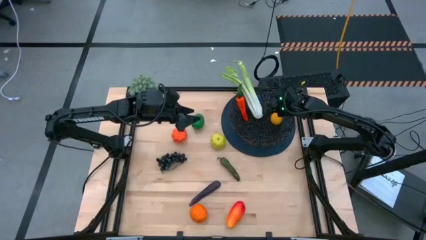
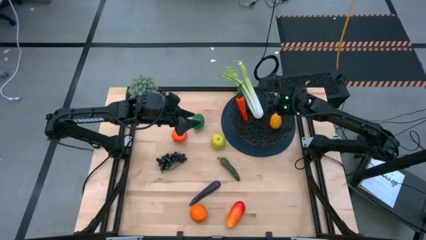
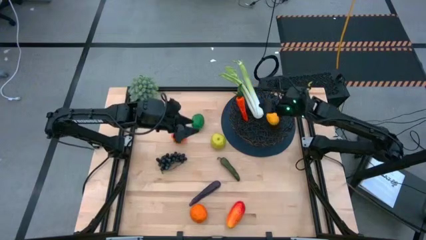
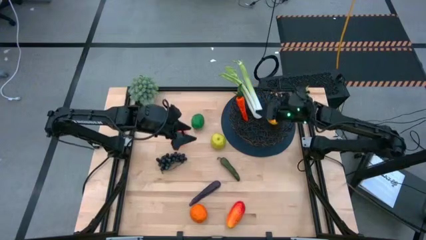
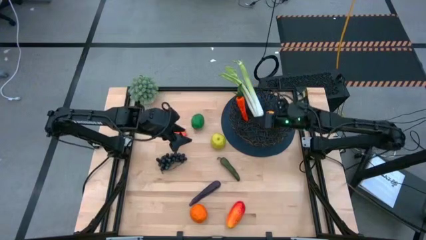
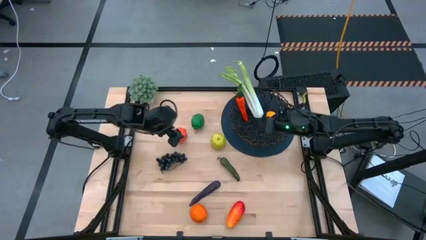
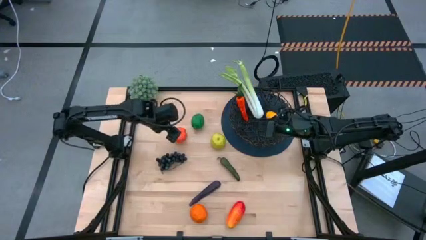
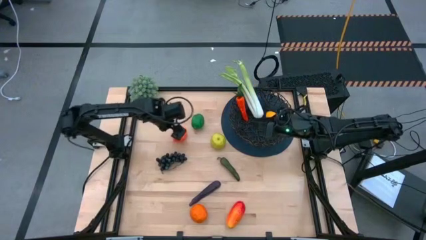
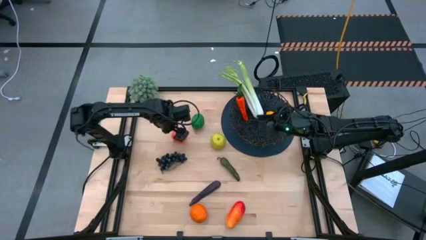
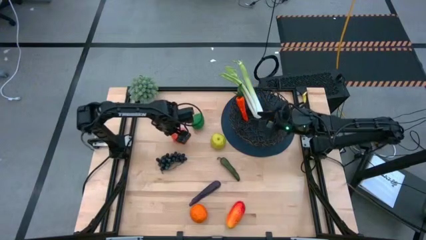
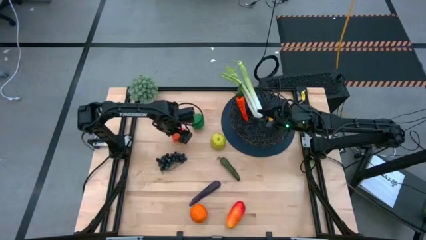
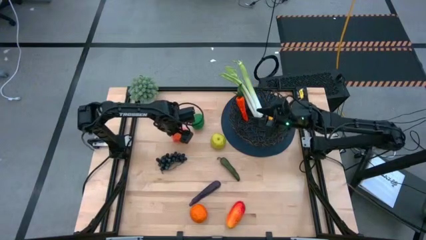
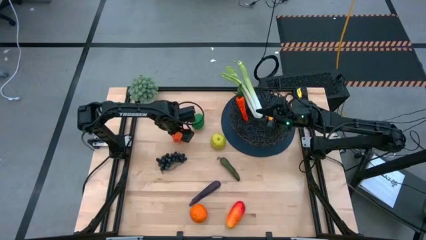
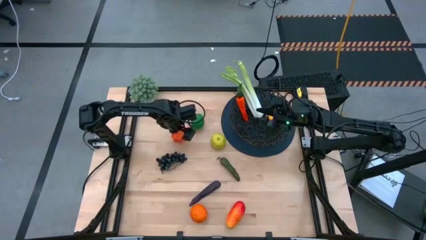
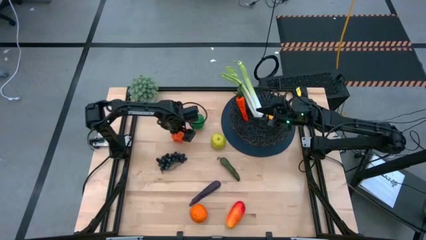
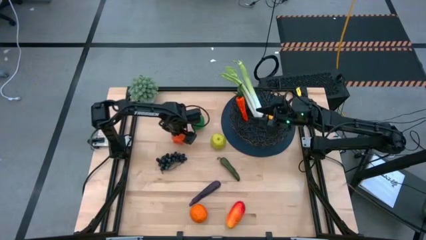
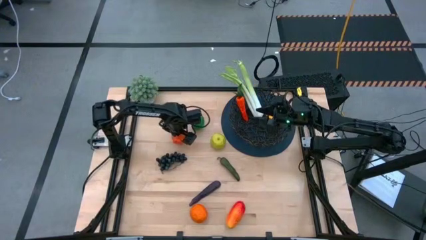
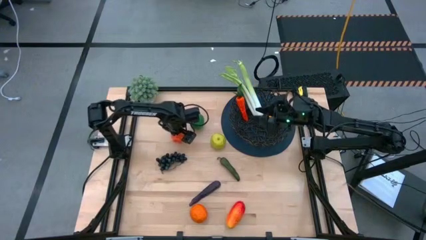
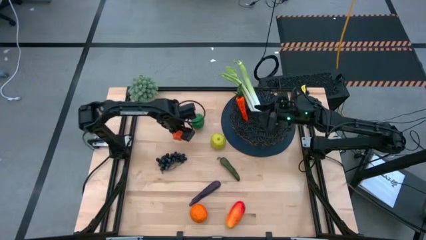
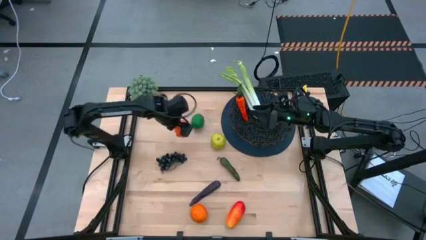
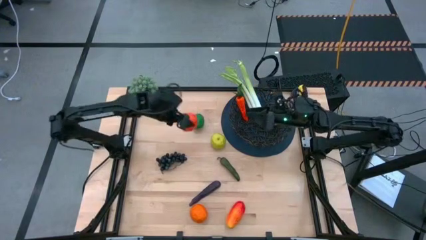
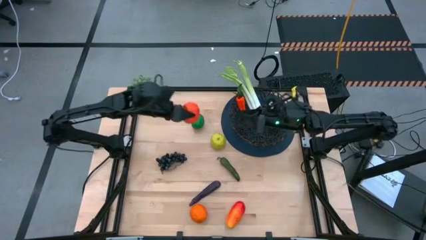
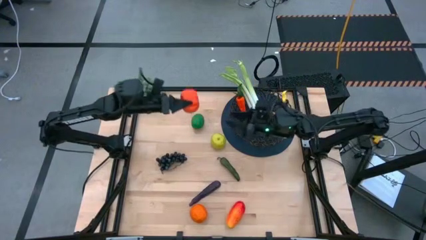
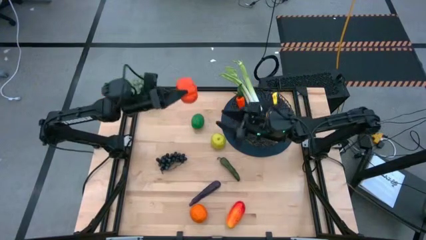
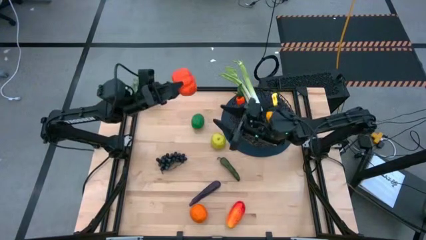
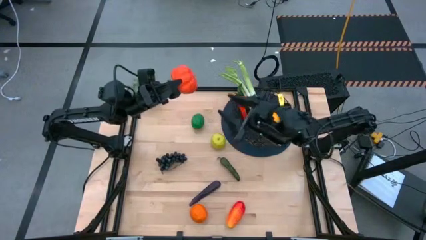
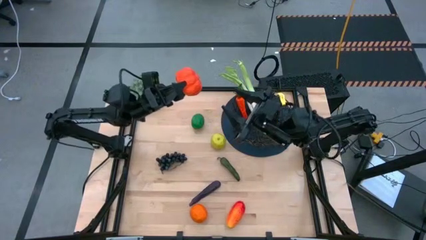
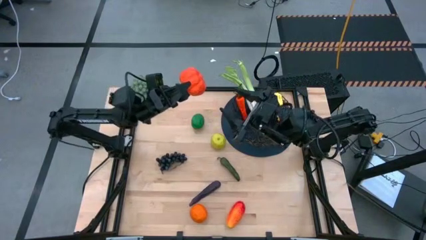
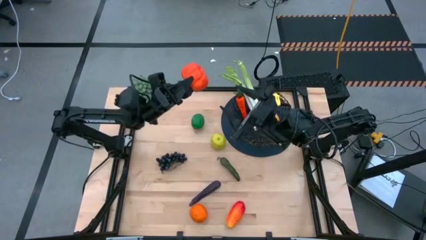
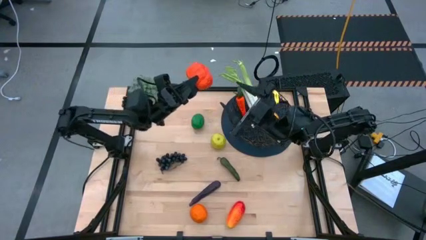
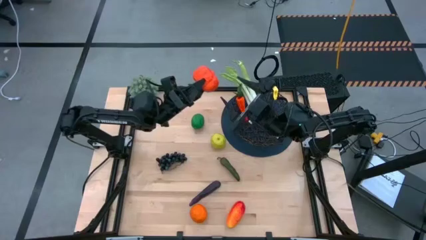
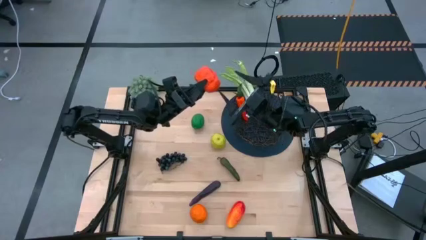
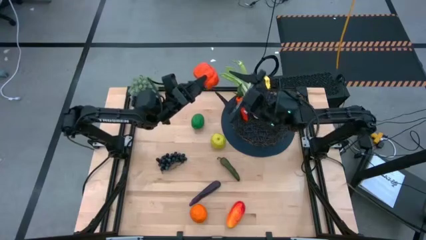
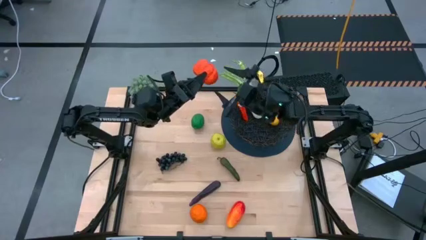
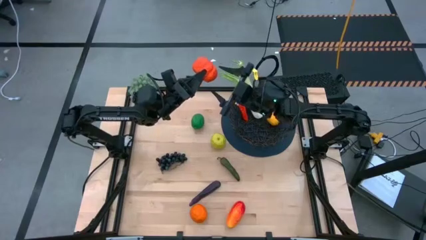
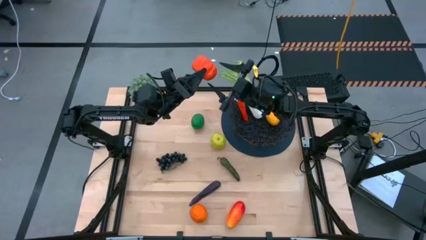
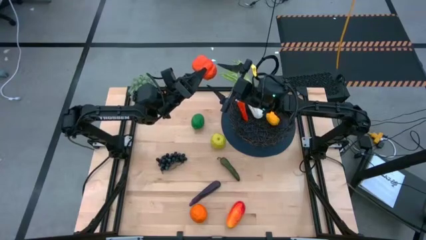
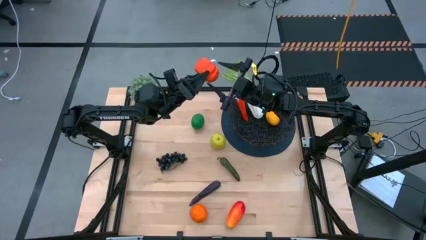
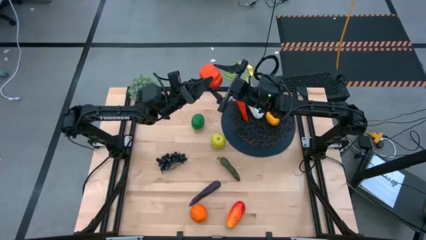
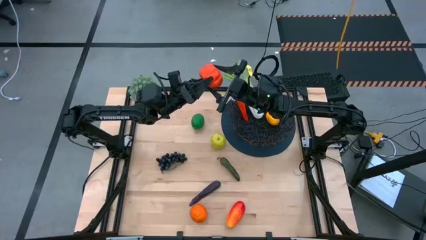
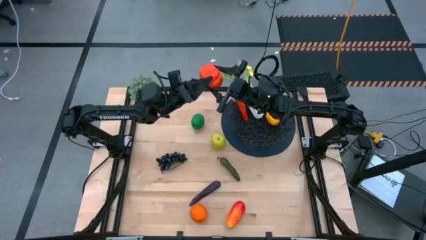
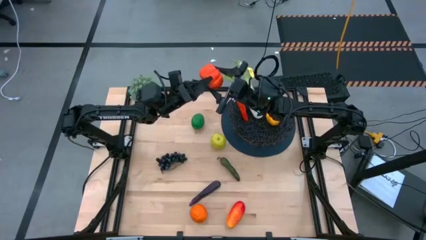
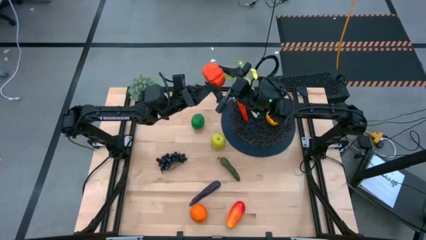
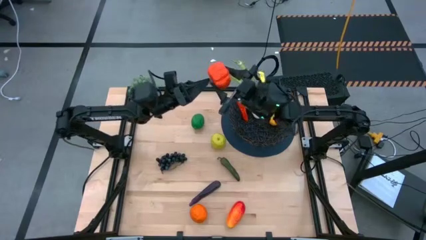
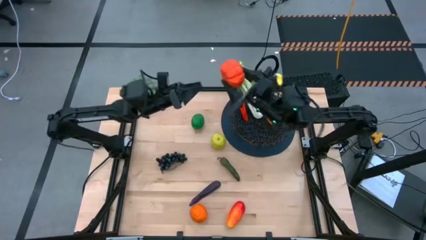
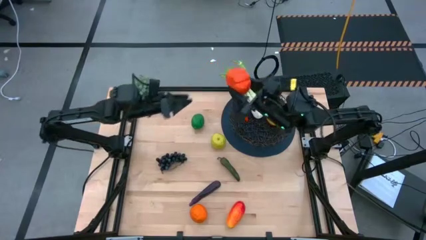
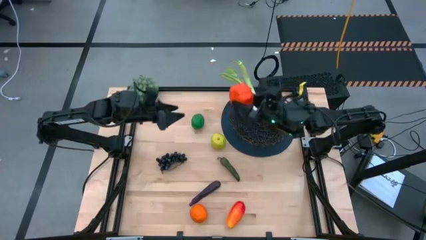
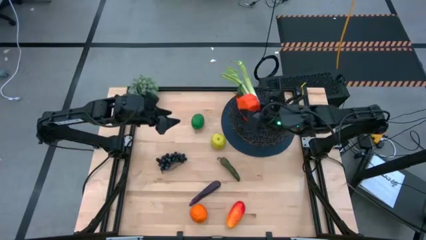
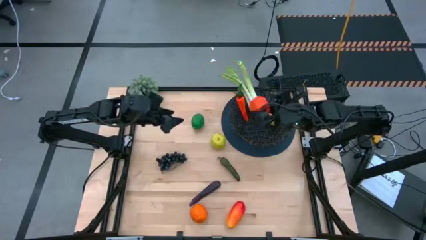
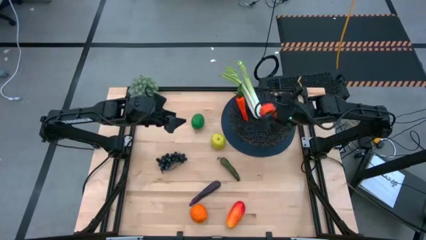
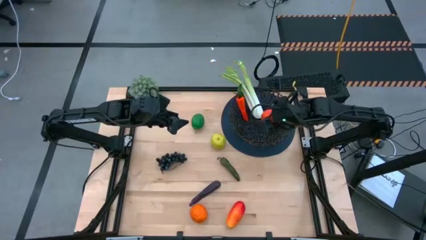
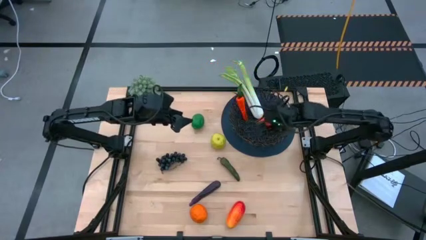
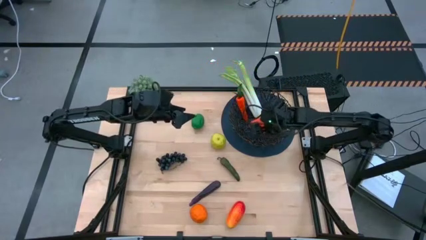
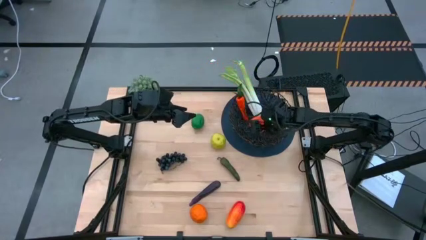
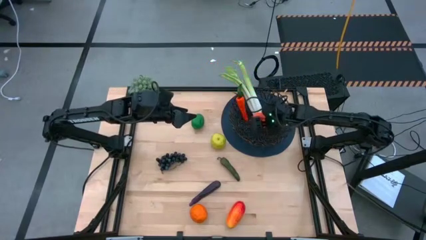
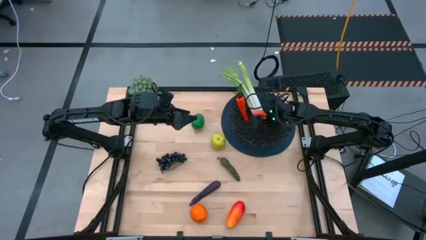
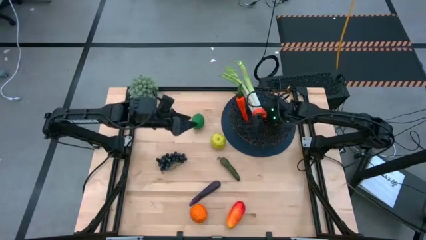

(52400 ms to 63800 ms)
Task: Build produce basket
Put the orange pumpkin into the black woven basket
